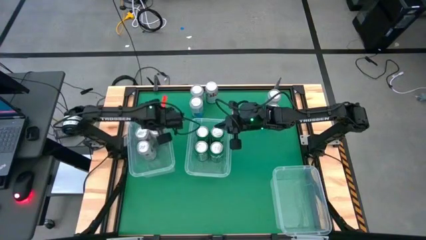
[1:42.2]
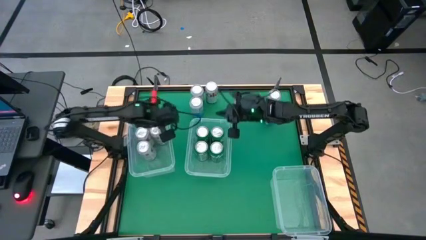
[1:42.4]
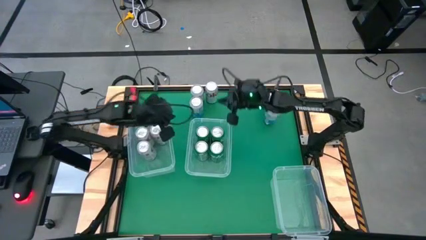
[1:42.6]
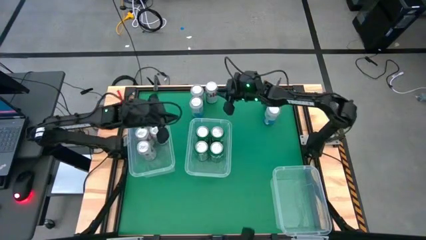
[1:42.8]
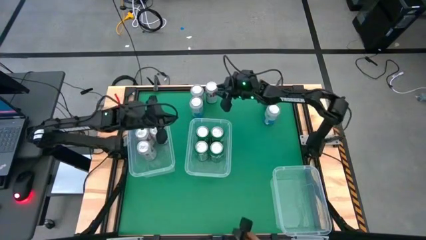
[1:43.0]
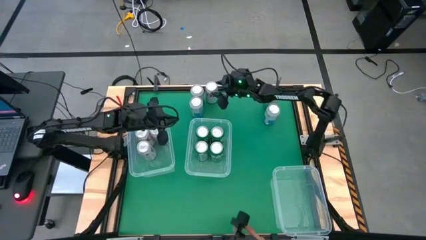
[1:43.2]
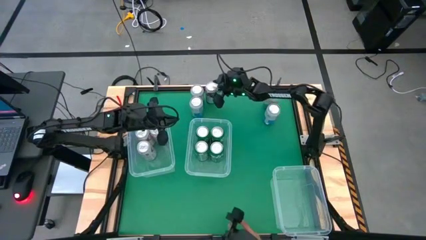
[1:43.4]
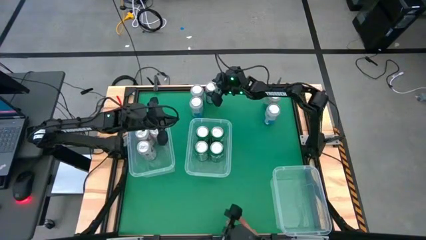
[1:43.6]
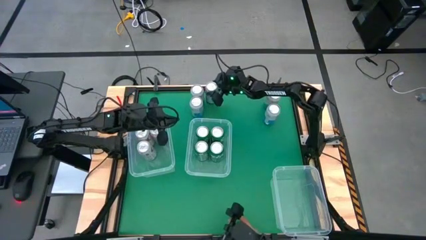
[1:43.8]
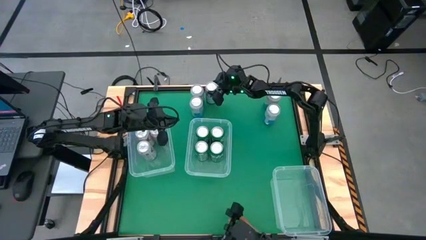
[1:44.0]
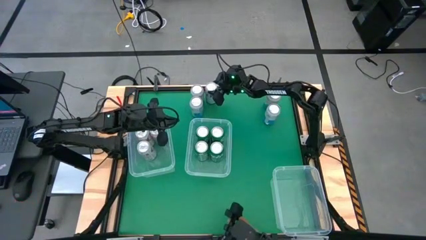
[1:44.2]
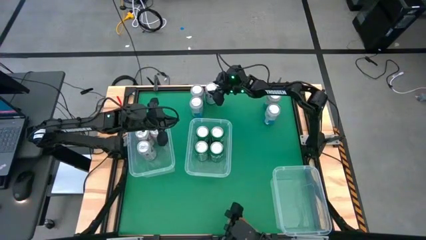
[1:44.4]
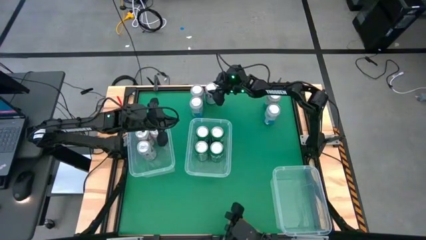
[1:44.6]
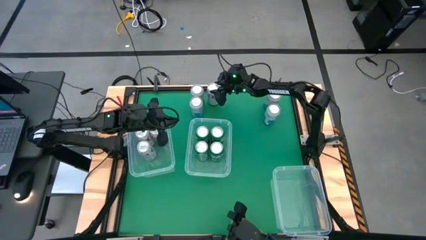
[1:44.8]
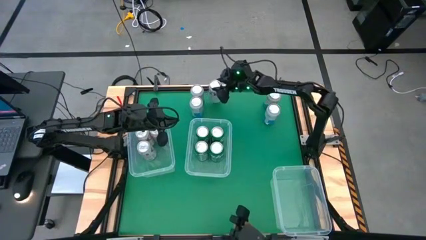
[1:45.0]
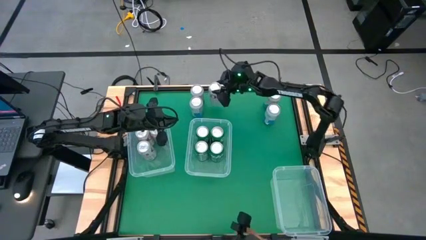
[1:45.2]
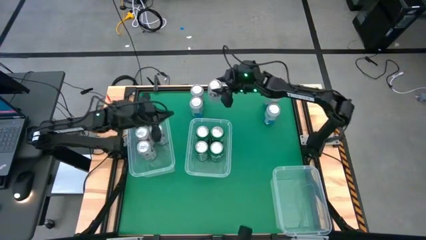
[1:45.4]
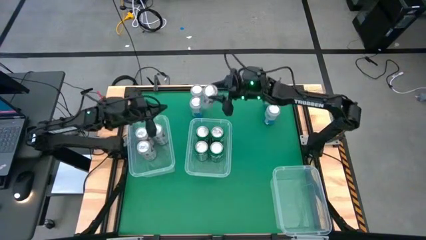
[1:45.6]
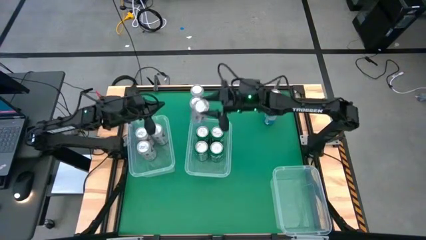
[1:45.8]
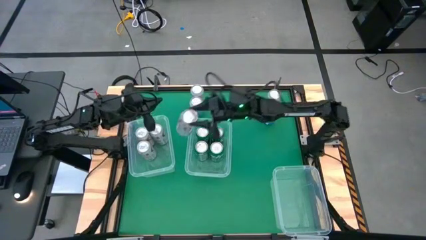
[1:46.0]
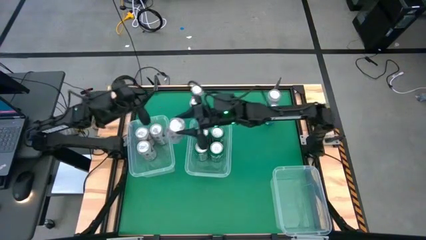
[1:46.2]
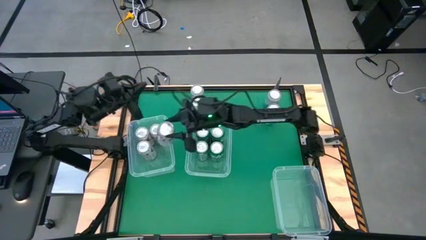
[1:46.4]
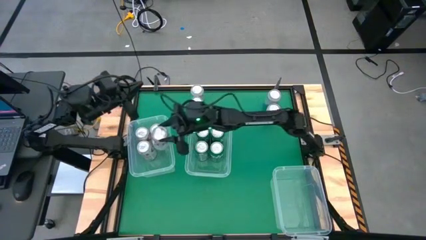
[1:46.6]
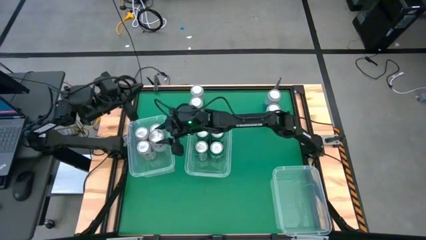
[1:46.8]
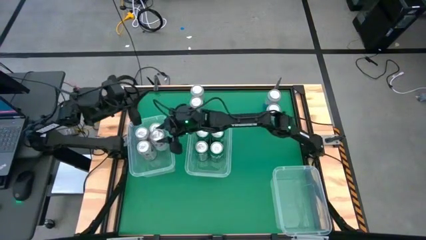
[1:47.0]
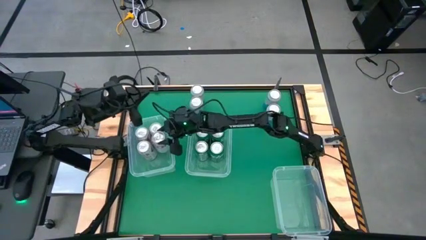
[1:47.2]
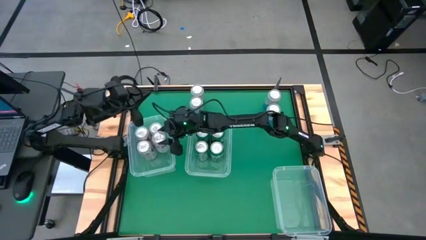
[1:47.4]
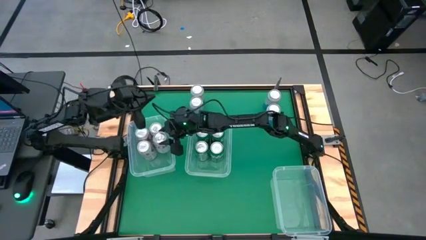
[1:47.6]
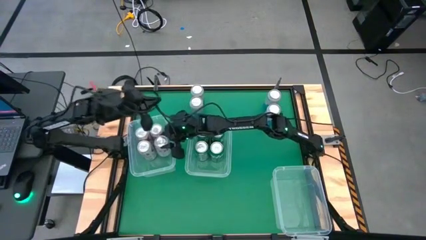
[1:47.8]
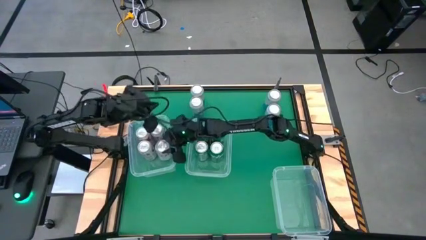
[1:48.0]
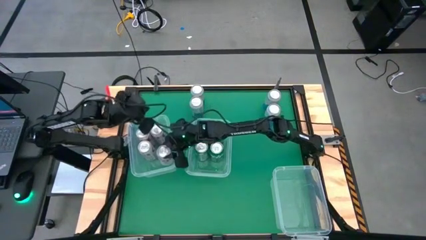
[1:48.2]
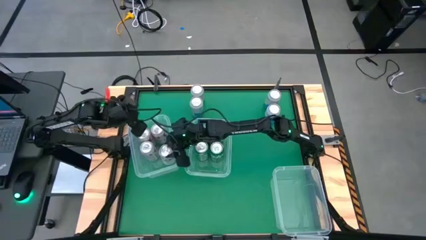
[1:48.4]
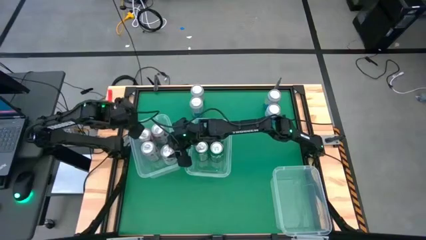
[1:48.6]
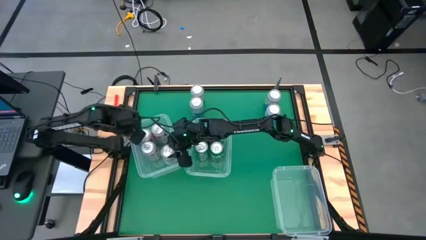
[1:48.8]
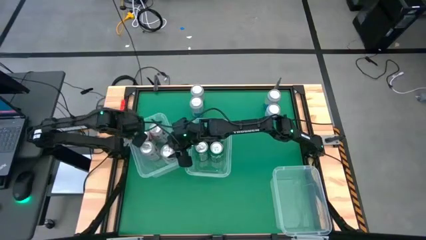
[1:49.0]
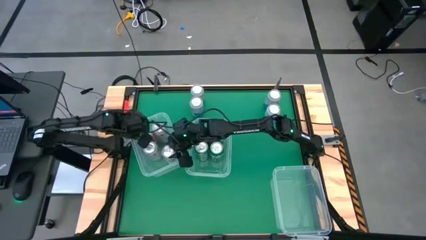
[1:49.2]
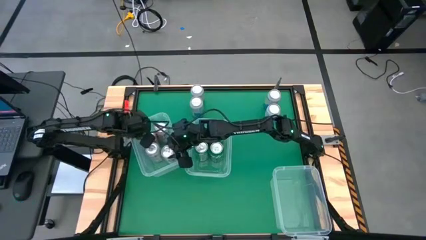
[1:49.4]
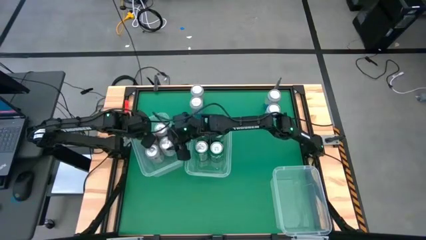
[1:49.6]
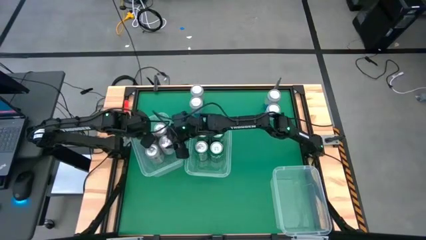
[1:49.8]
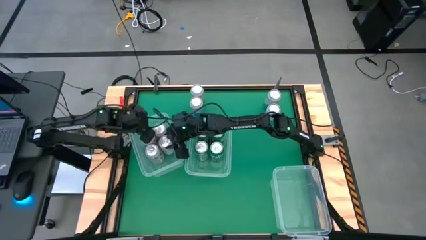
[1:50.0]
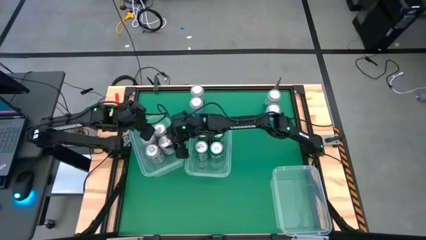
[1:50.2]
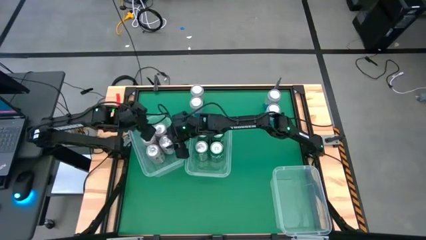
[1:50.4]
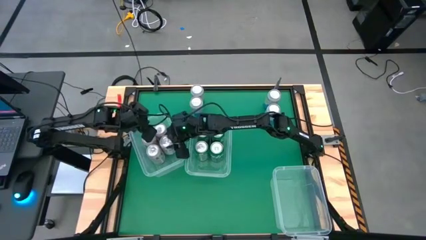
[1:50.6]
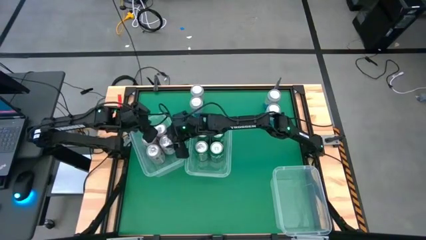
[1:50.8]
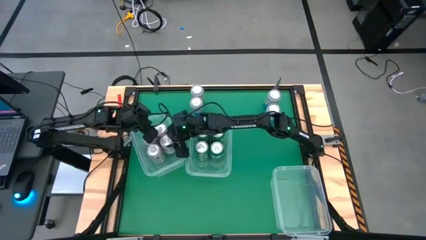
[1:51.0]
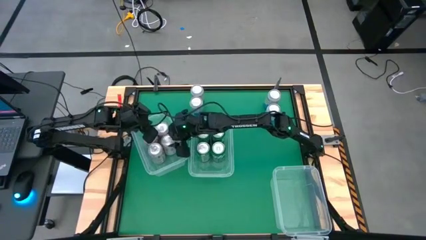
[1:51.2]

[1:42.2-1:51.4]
Task: Sort soda cans
Put the silver soda can into the bottom left bin

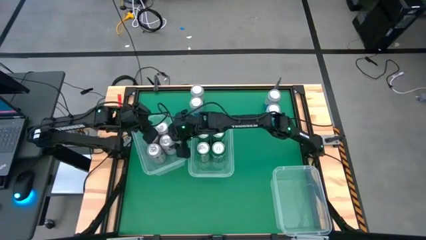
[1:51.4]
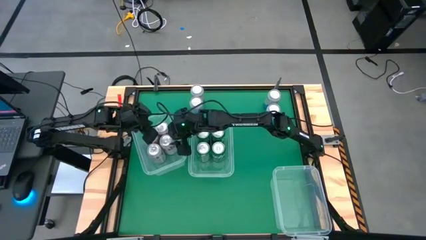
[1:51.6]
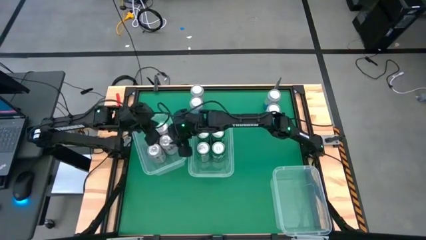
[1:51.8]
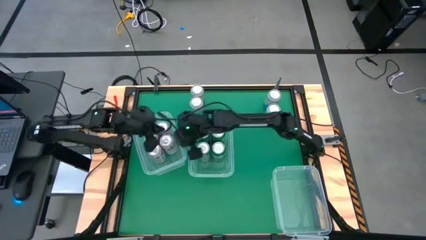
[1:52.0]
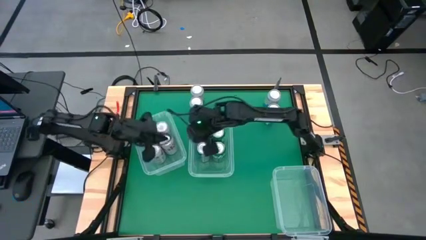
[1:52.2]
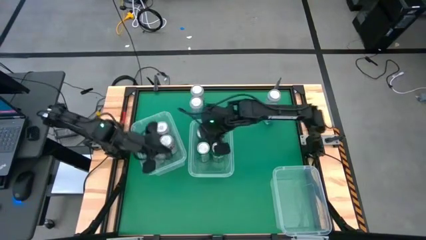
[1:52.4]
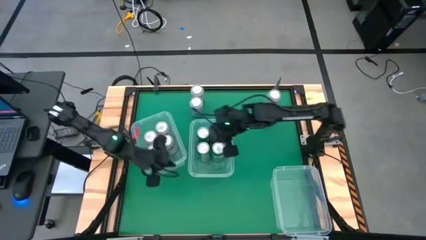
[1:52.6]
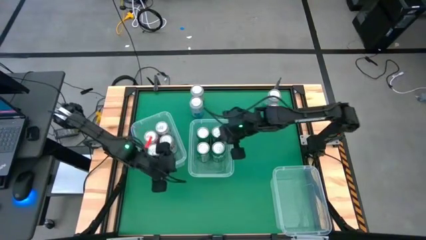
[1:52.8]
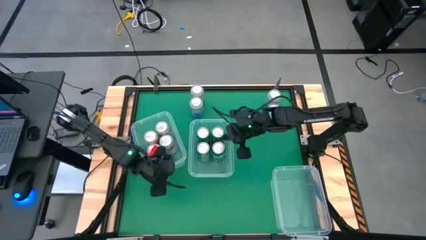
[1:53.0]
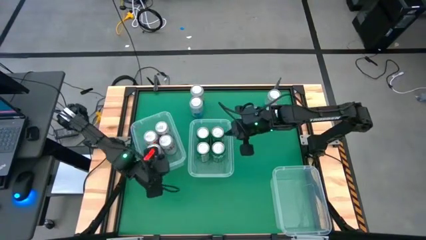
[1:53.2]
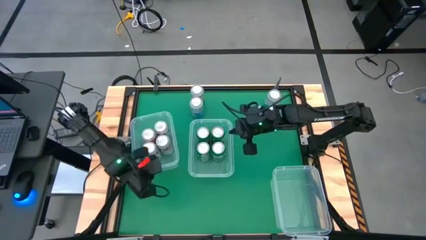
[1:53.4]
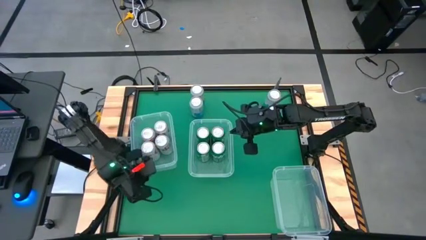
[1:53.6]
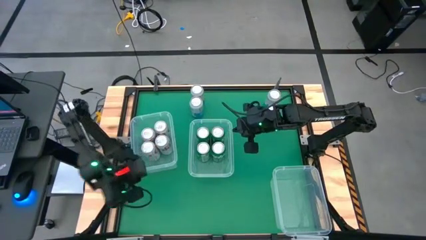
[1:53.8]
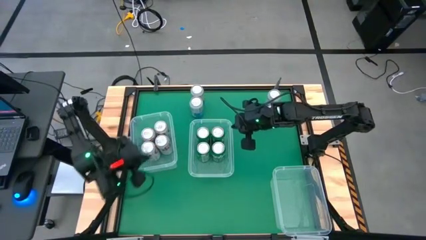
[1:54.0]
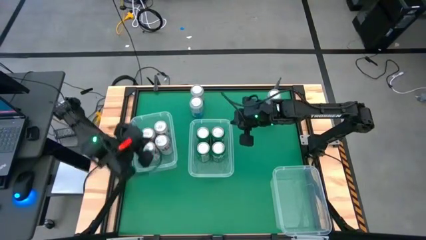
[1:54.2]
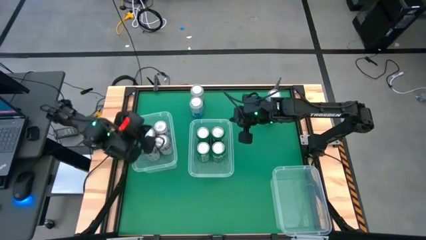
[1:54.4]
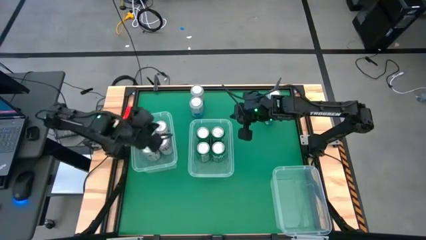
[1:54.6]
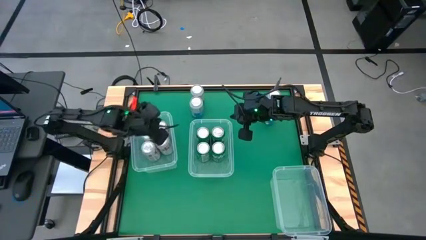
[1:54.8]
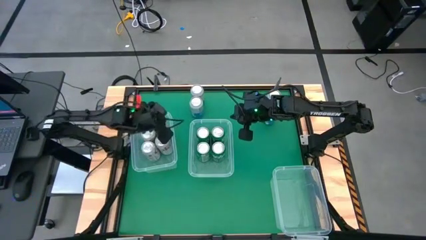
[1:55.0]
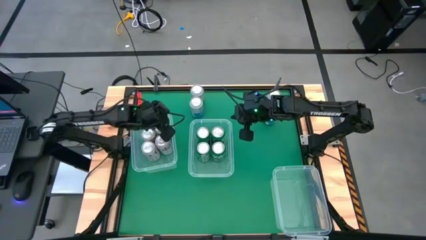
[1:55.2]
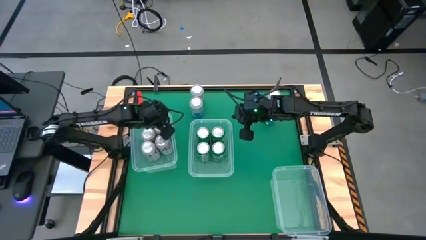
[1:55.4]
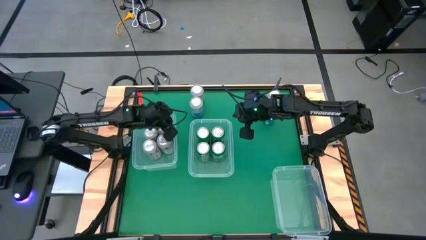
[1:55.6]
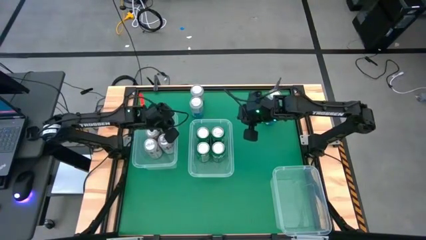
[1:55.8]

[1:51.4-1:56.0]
Adjust the left bin

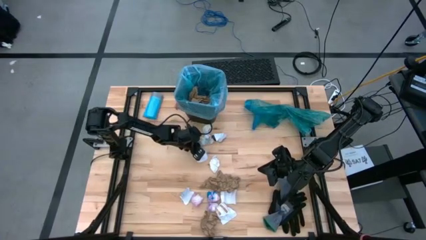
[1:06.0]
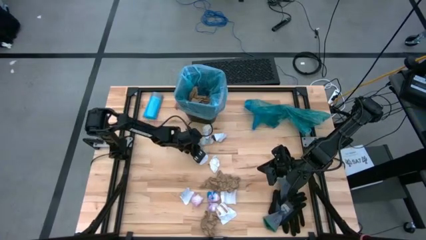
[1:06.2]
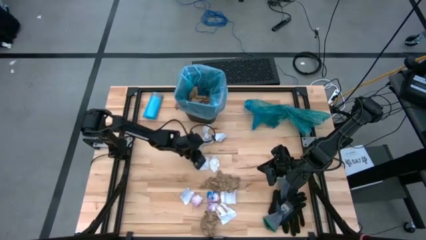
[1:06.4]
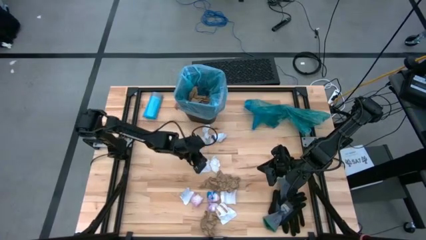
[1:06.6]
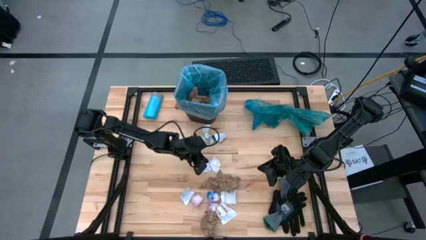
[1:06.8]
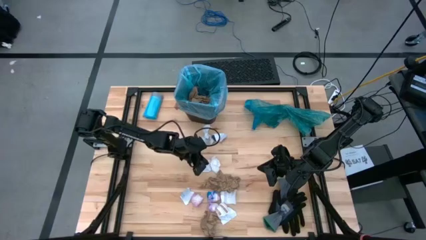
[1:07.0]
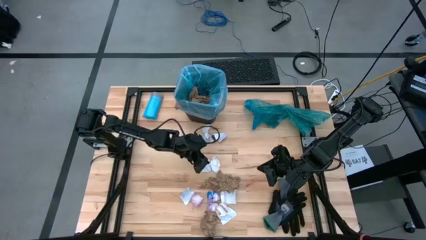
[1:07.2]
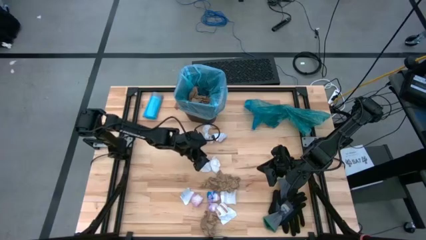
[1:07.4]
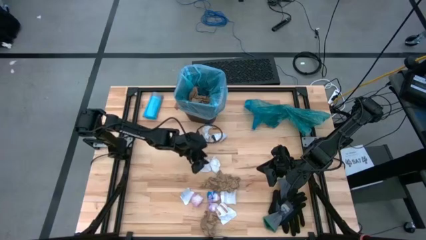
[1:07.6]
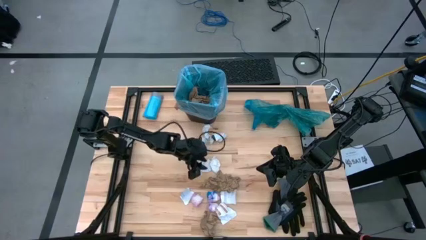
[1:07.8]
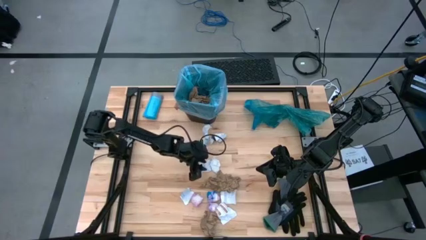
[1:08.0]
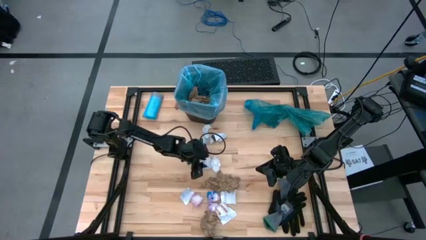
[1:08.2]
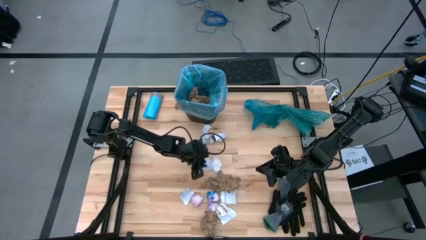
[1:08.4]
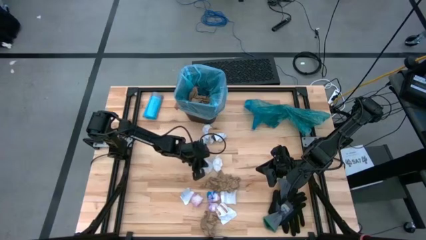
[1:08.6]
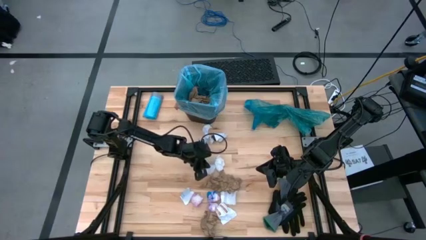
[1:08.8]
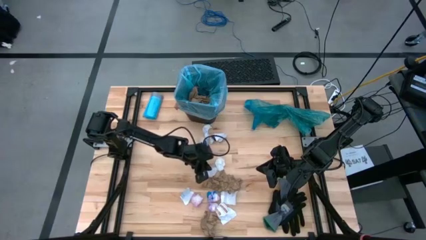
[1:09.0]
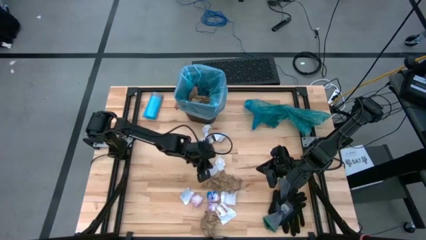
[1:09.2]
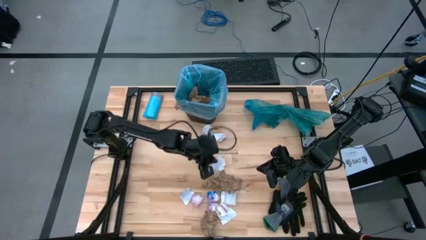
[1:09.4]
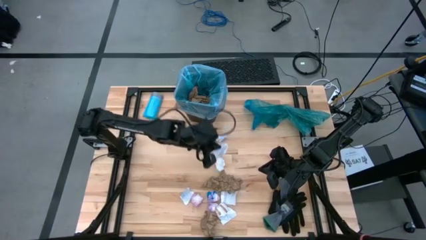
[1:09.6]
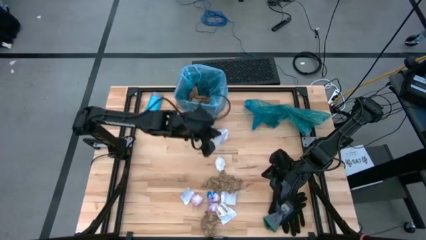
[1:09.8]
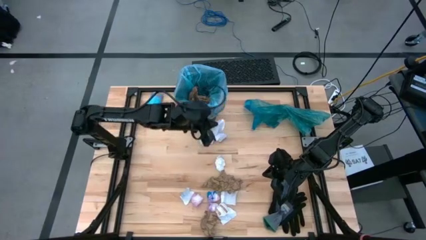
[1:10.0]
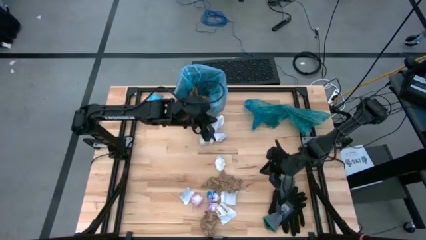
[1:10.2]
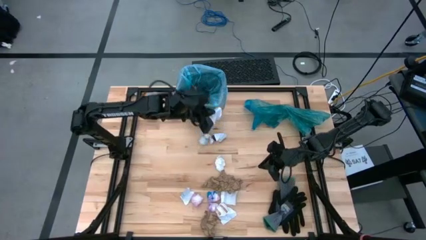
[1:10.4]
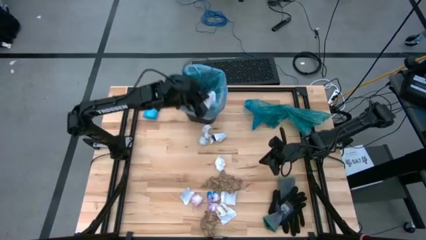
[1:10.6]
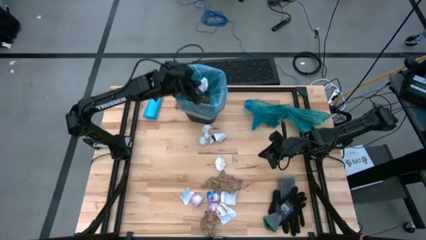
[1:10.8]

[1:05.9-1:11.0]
Task: place trash/remove bag and relplace
Put the white paper trash into the trash bin
